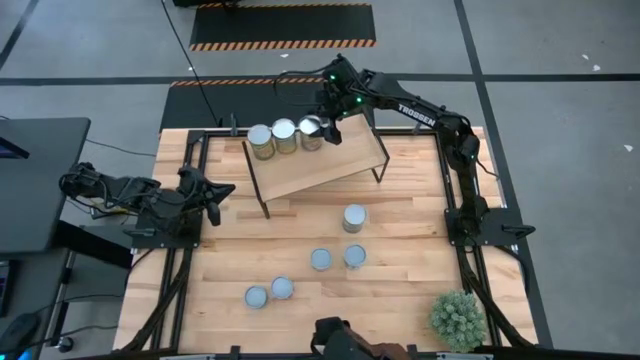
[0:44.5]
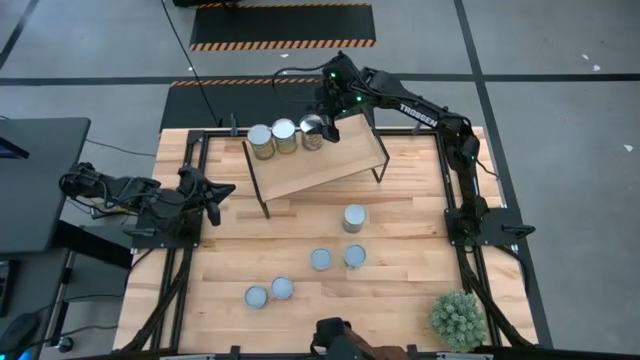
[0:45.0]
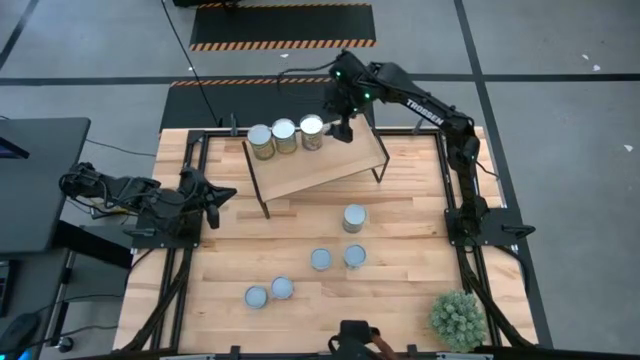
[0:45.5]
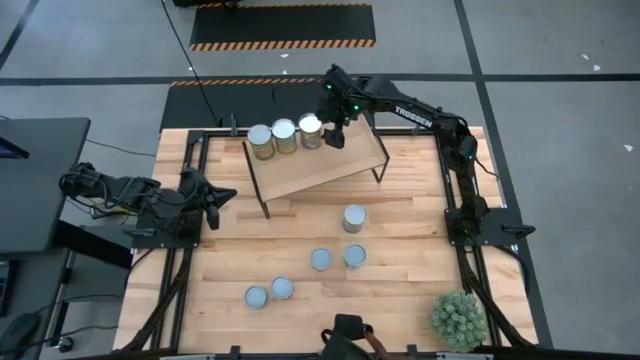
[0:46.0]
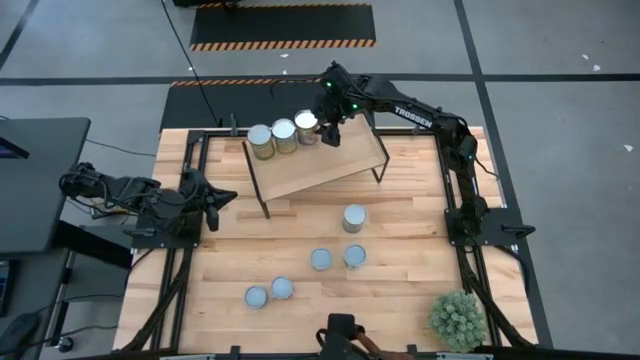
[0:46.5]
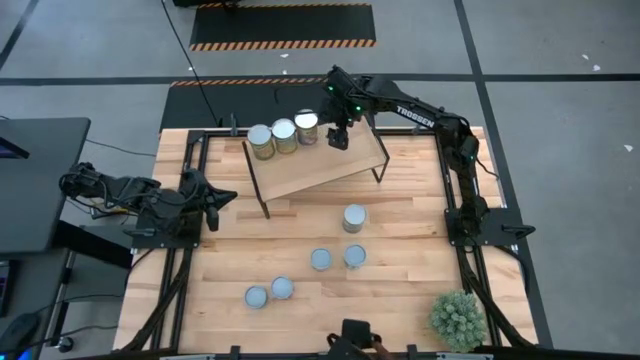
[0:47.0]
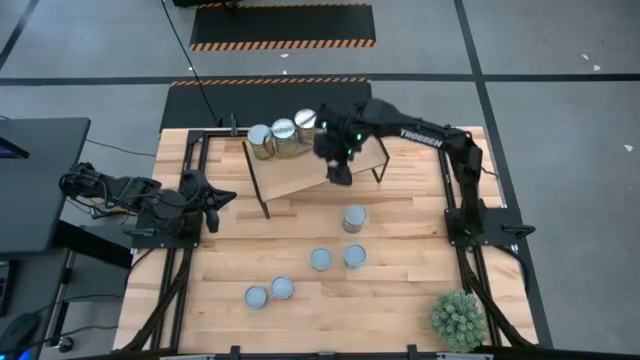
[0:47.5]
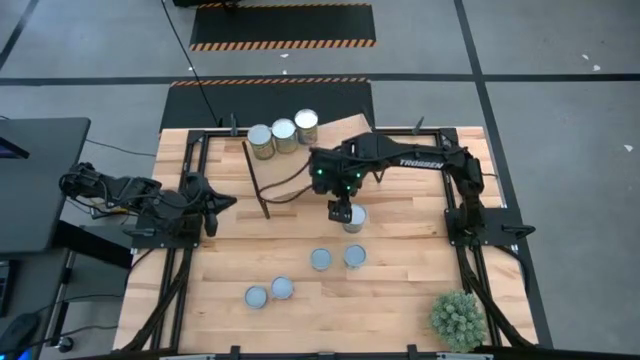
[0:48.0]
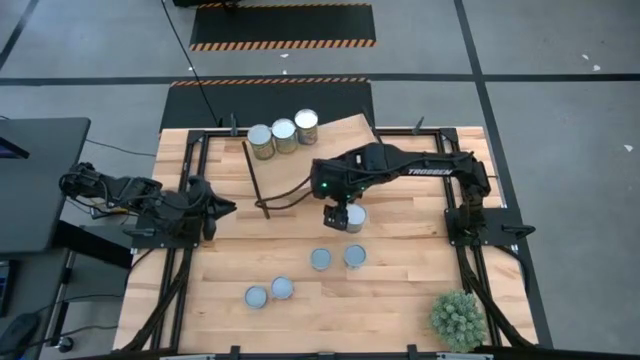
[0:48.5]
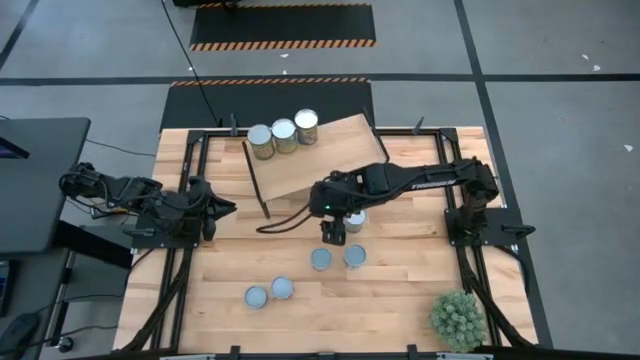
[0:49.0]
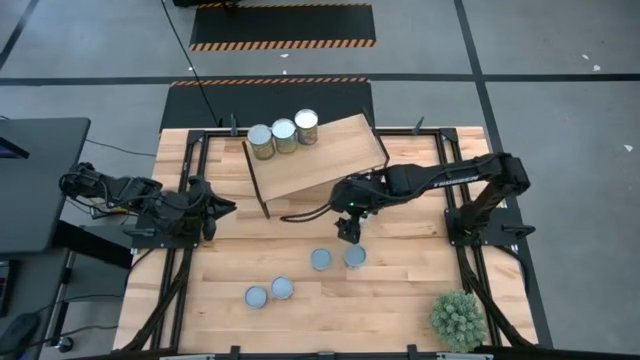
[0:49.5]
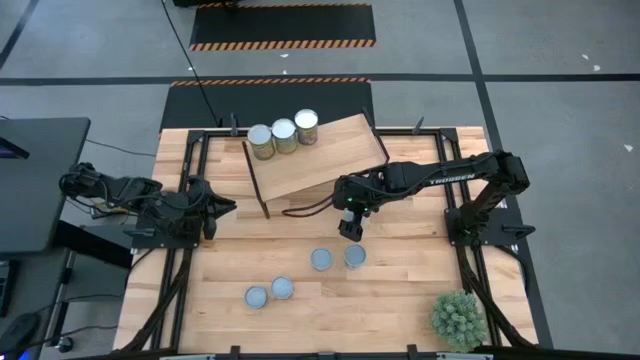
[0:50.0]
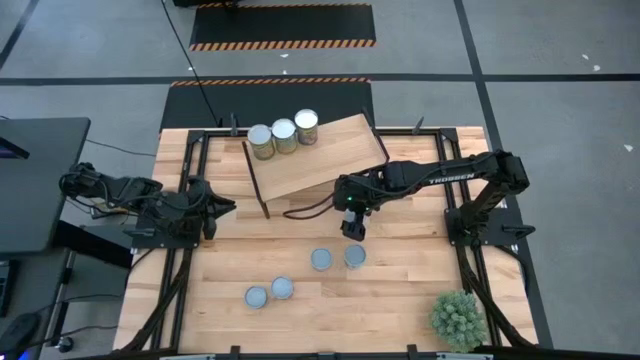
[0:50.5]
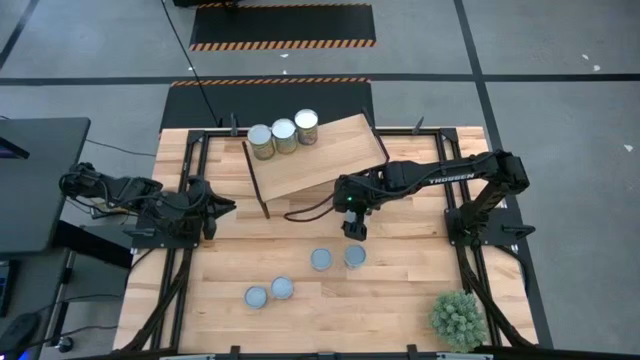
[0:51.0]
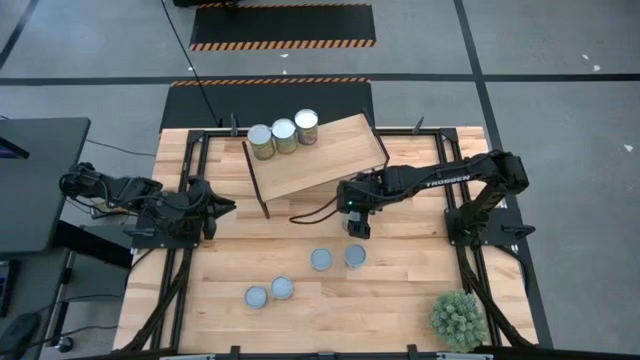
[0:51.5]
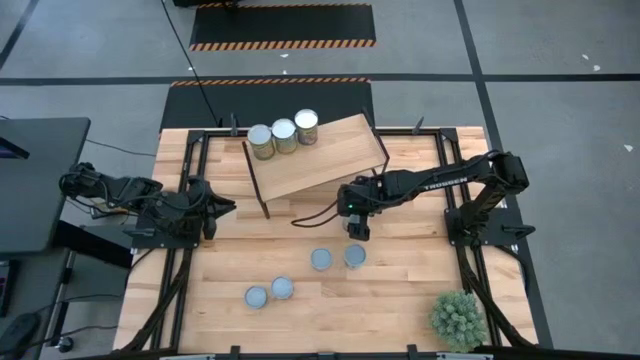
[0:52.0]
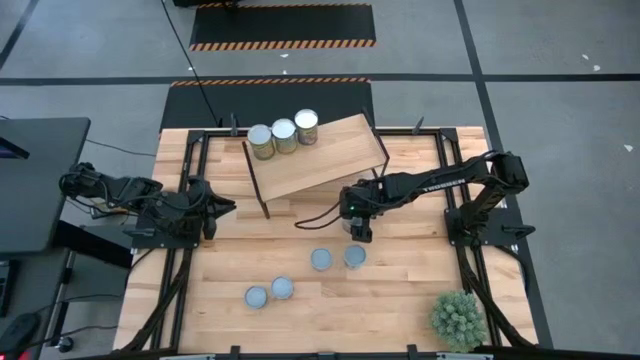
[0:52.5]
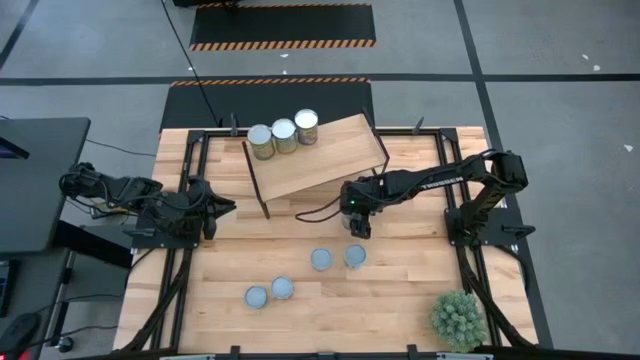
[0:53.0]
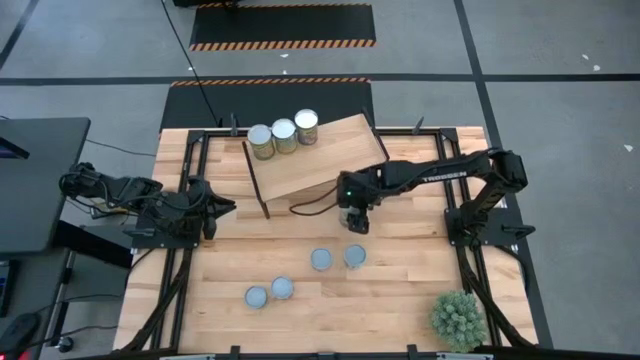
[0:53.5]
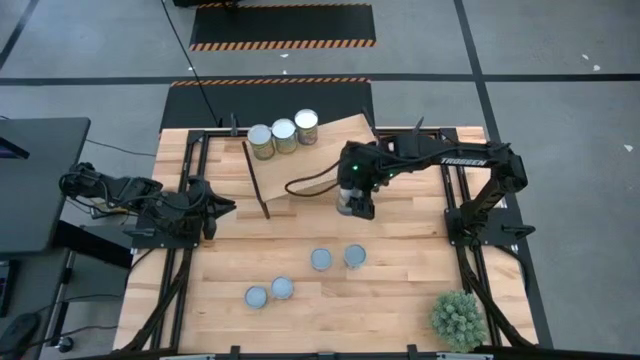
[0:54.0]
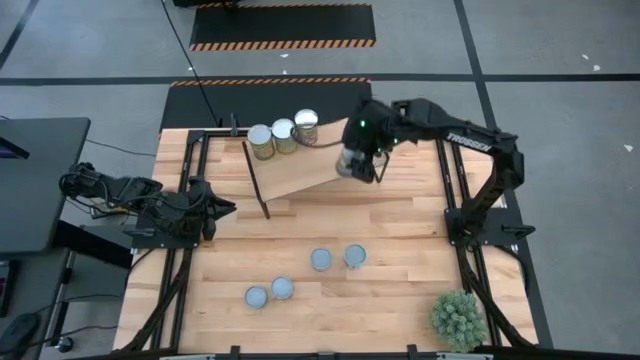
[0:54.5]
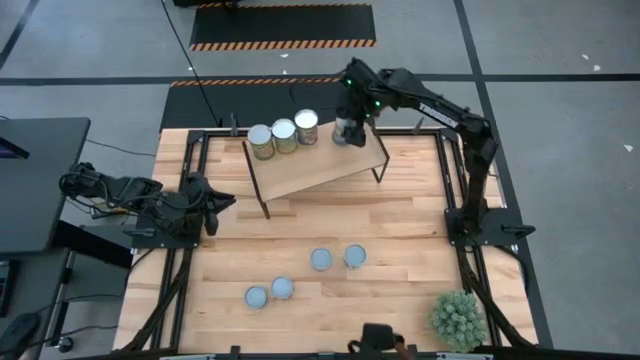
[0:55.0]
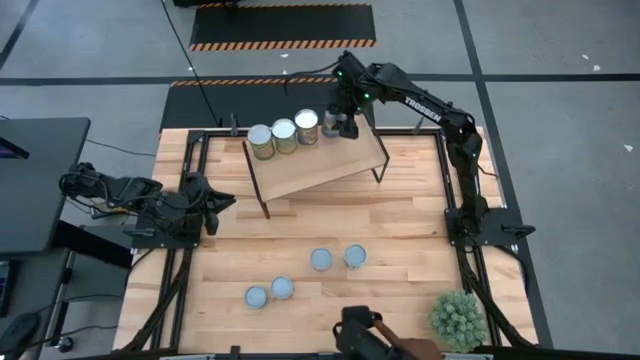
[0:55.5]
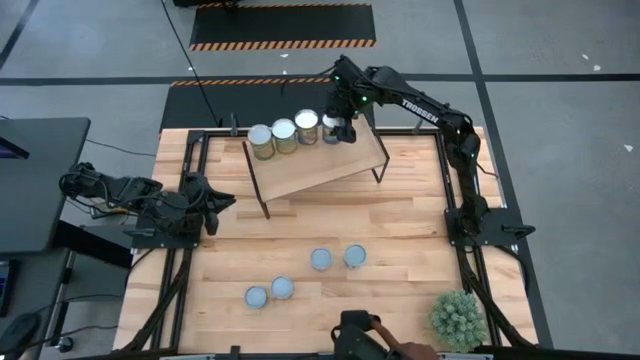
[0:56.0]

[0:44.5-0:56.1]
Task: Pick and place cans onto a shelf
Put the peas can on the shelf

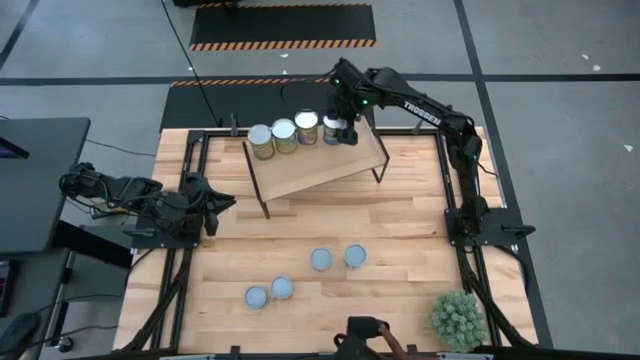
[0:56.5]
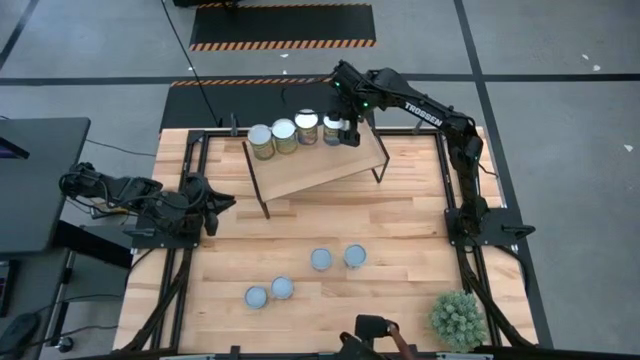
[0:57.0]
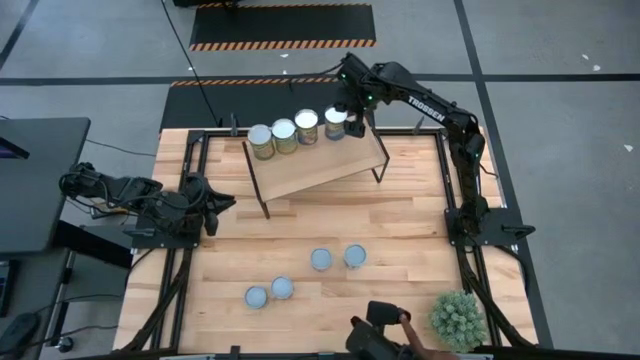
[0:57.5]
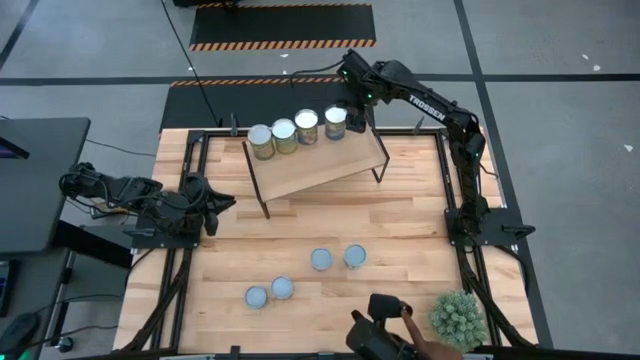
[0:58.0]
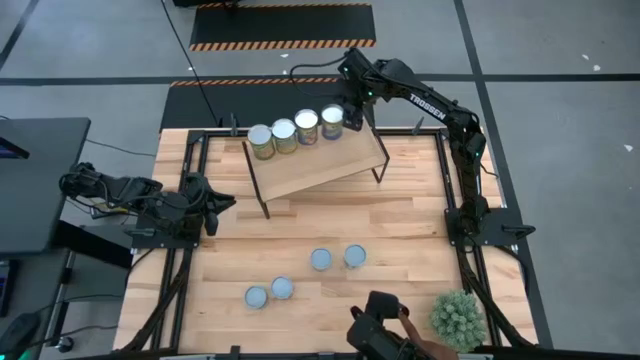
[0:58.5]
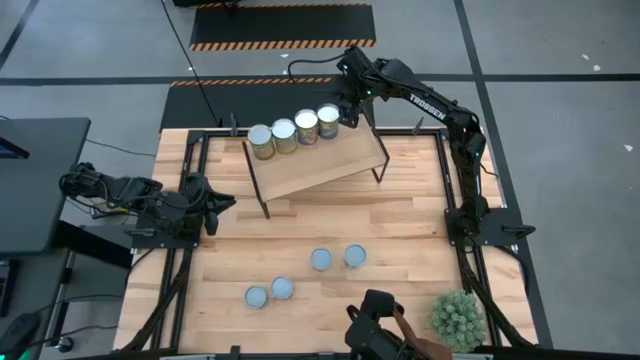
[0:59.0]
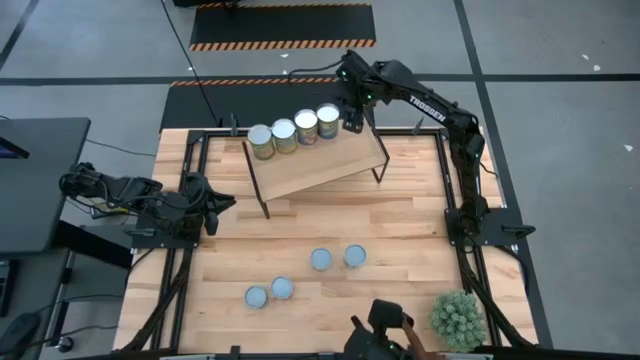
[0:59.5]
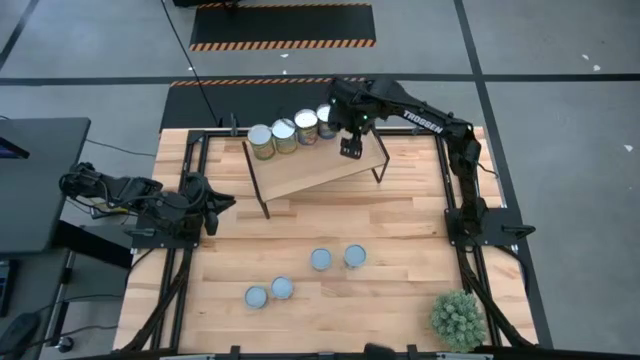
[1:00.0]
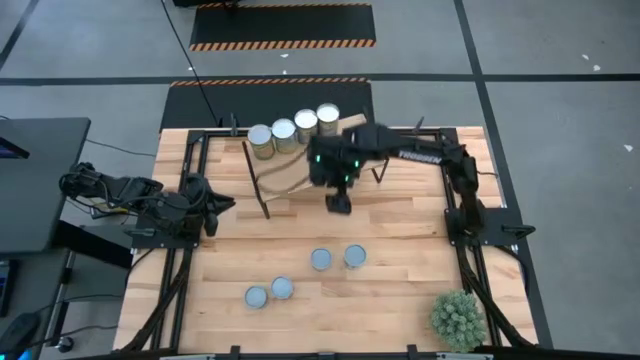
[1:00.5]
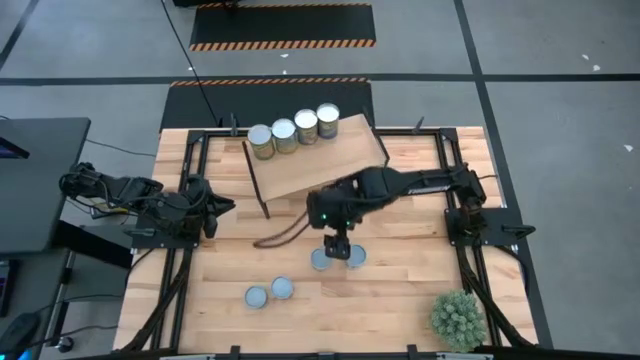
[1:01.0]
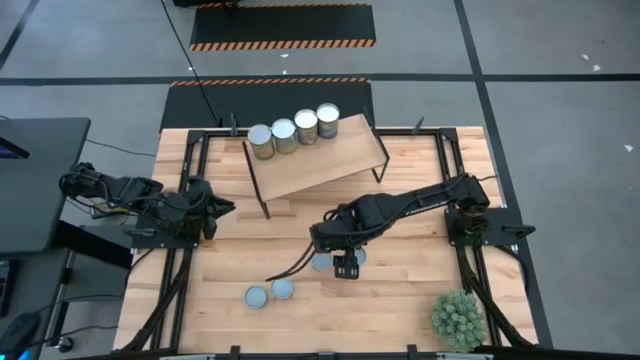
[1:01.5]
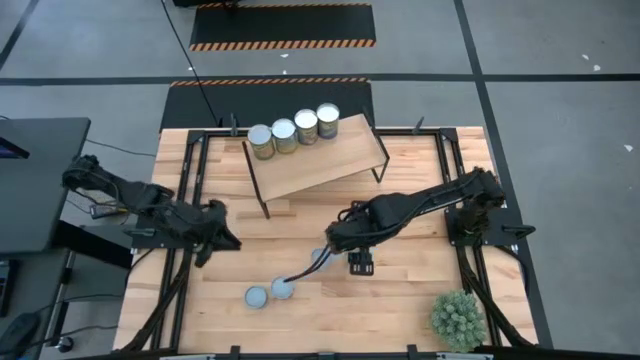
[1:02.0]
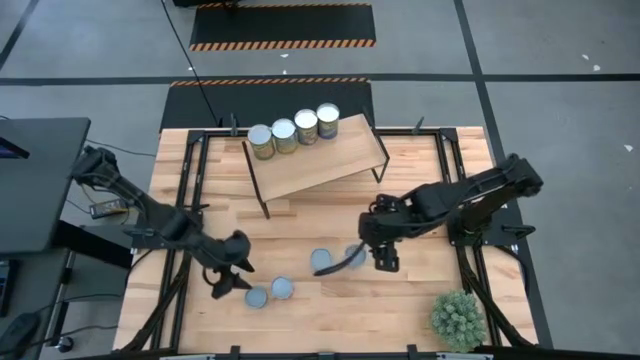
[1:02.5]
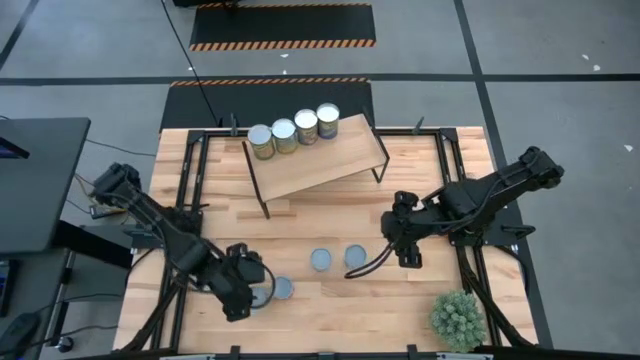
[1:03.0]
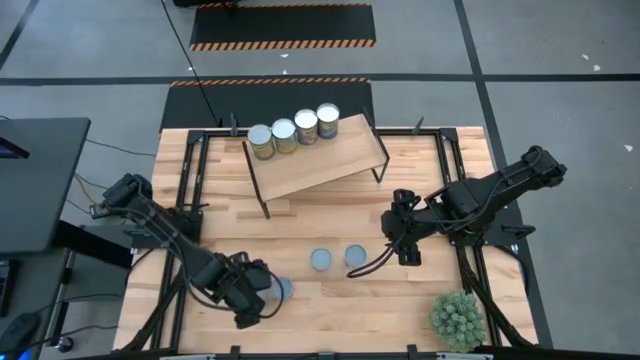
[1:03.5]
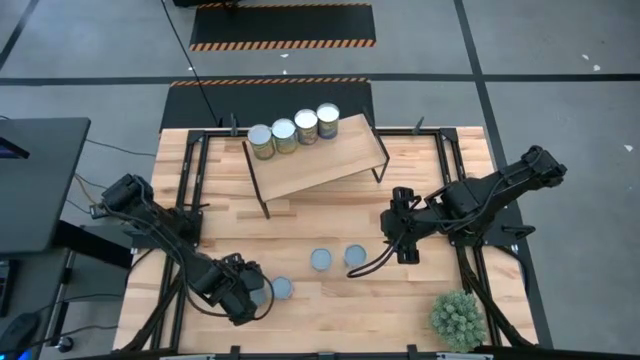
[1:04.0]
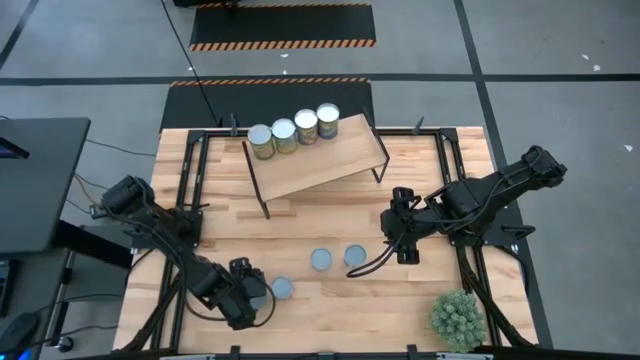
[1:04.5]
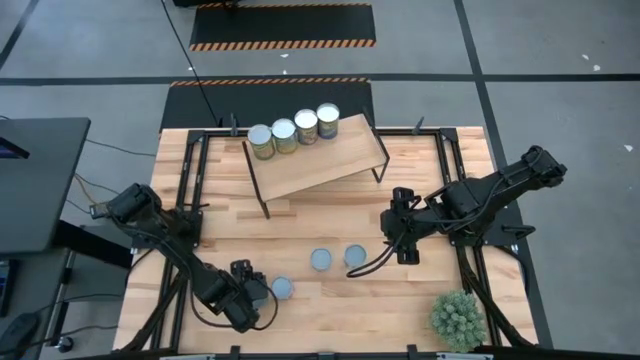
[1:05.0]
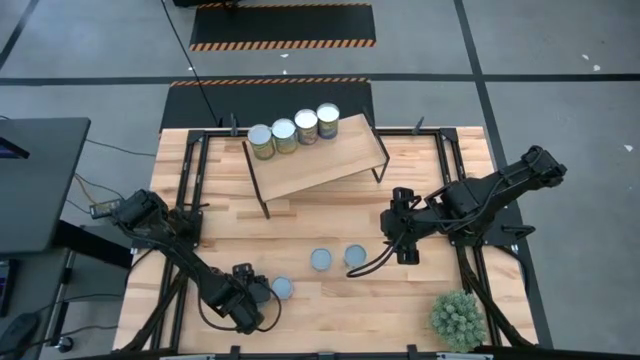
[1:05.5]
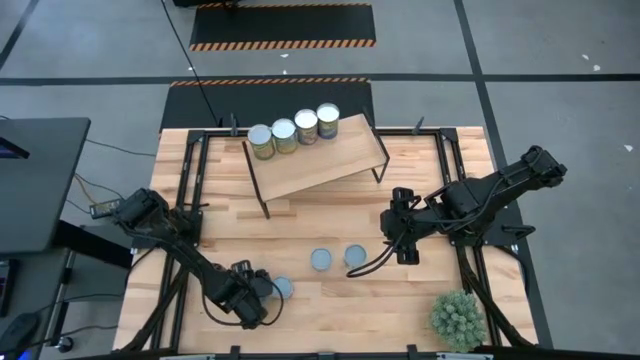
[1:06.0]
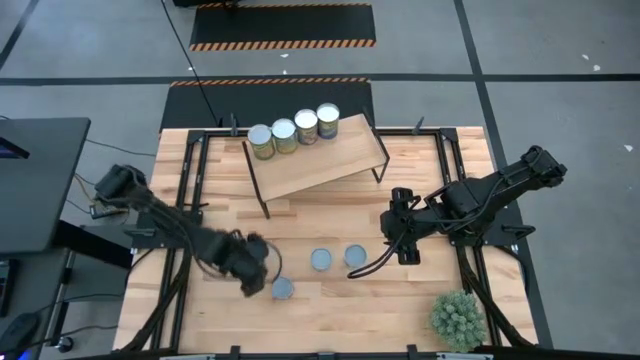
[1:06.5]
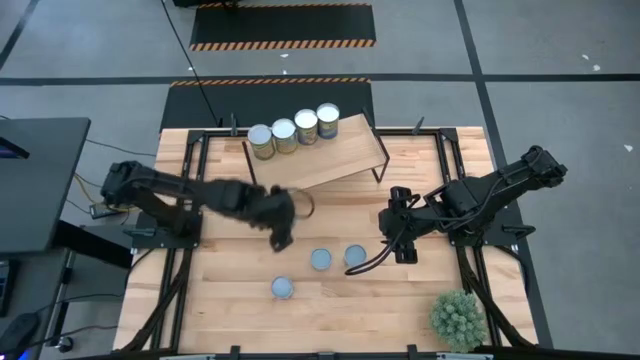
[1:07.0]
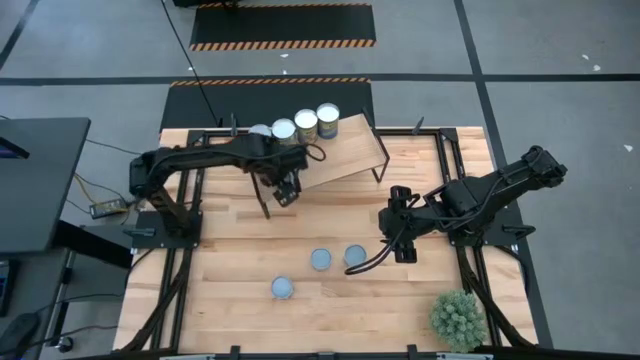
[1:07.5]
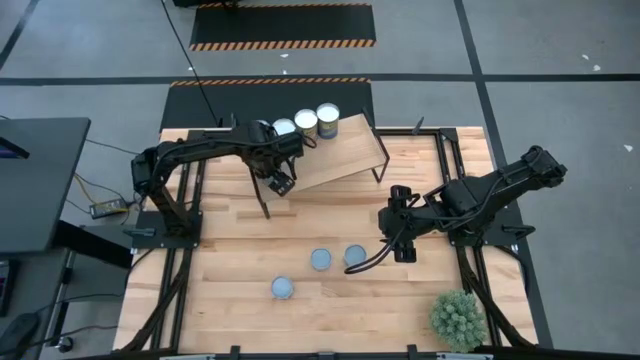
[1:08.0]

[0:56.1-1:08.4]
Put the tuna fish can on the shelf
